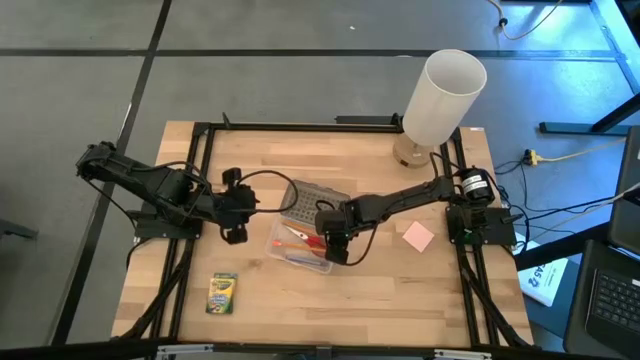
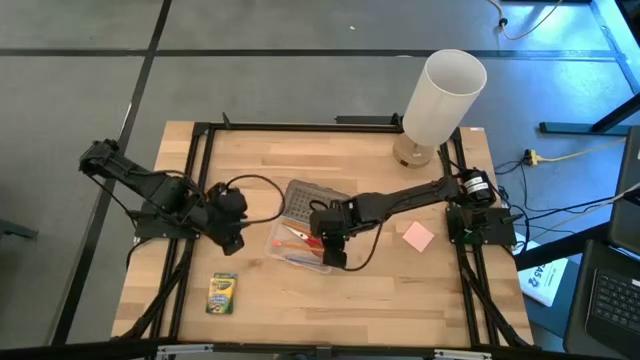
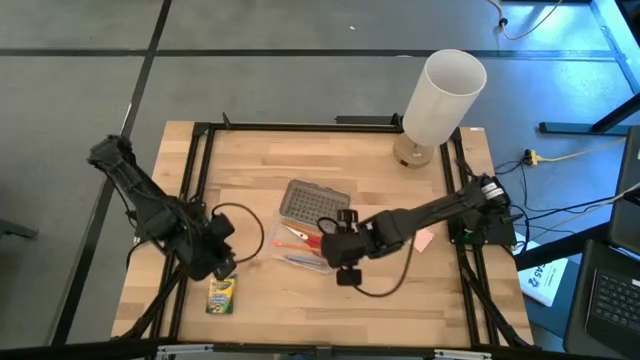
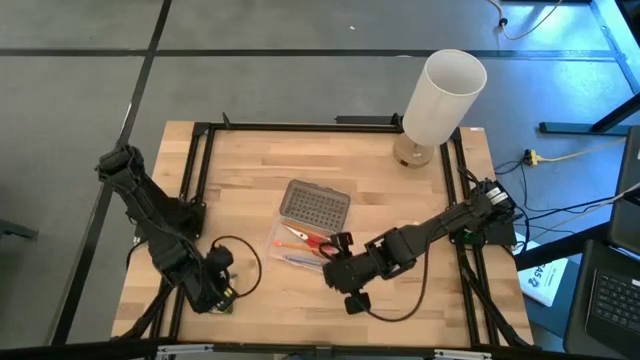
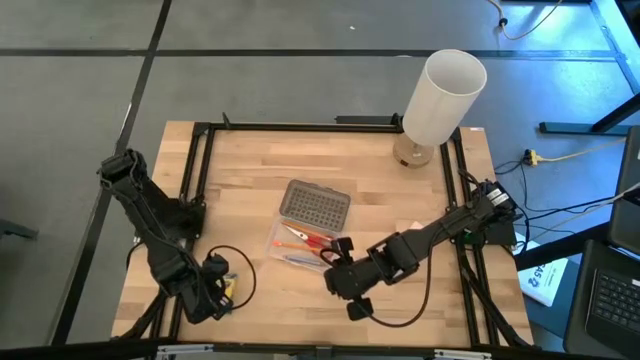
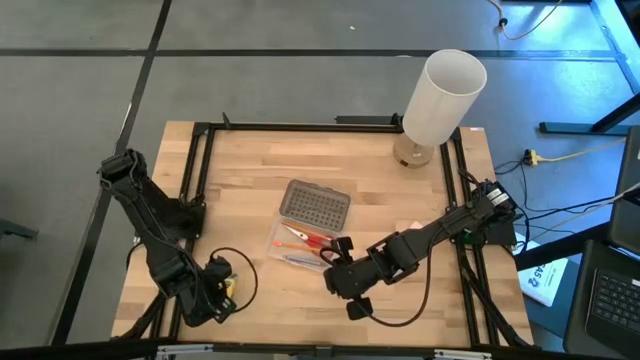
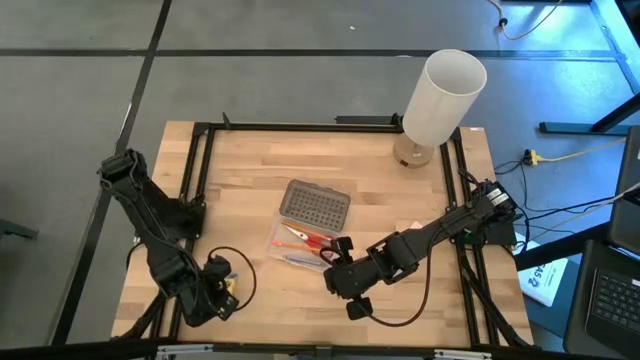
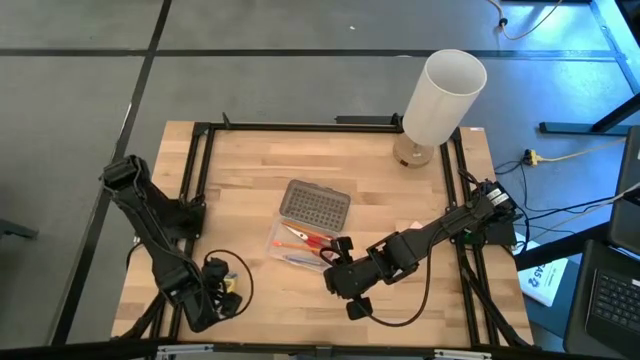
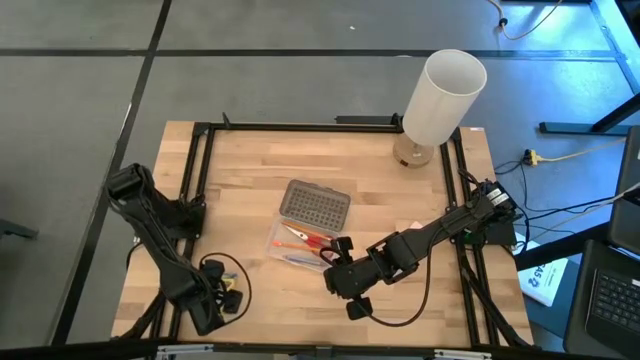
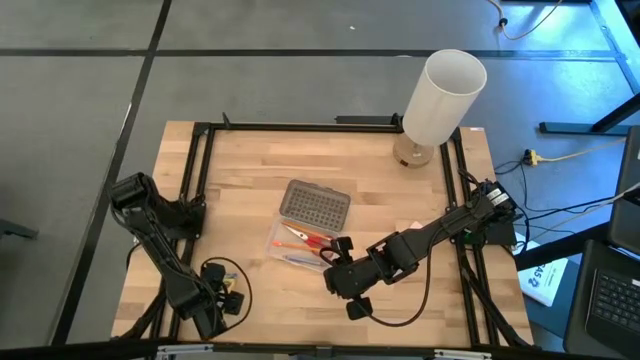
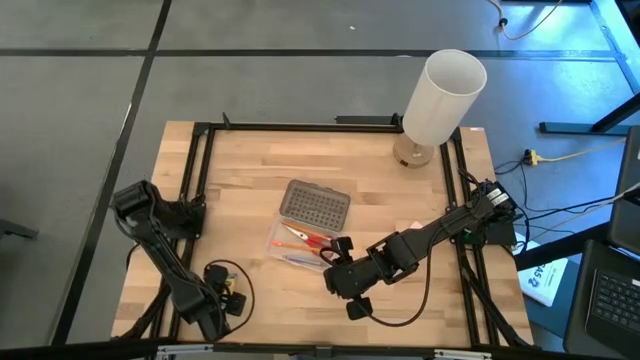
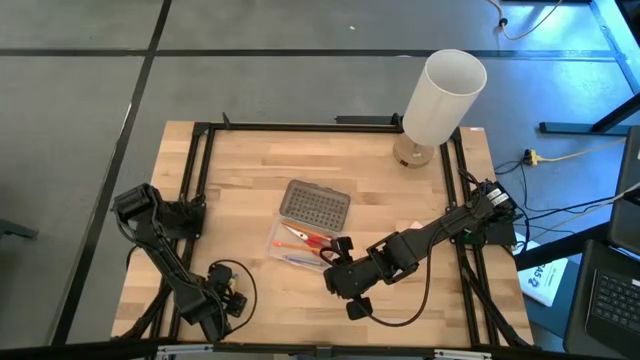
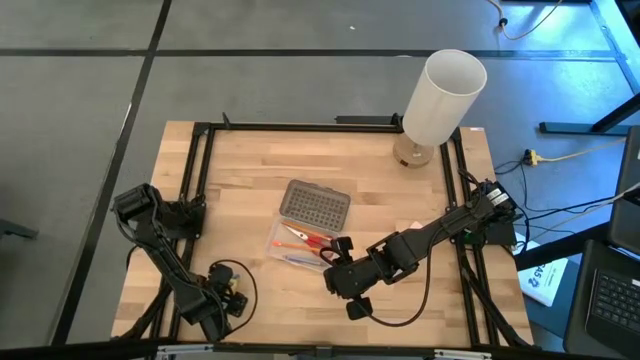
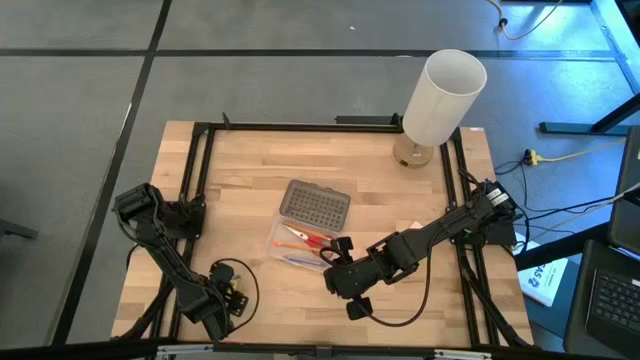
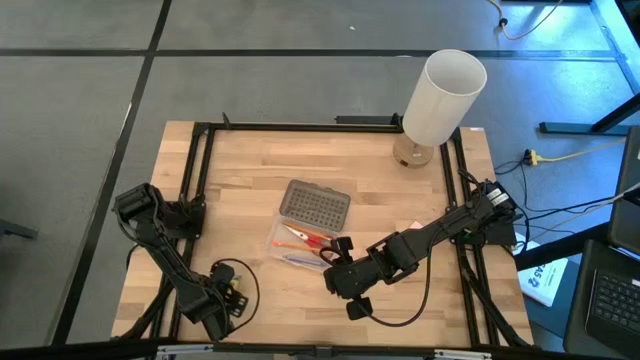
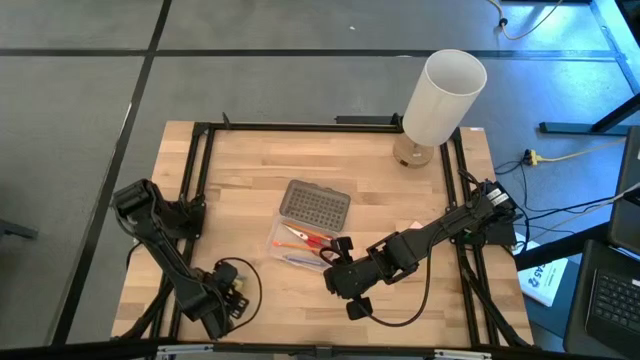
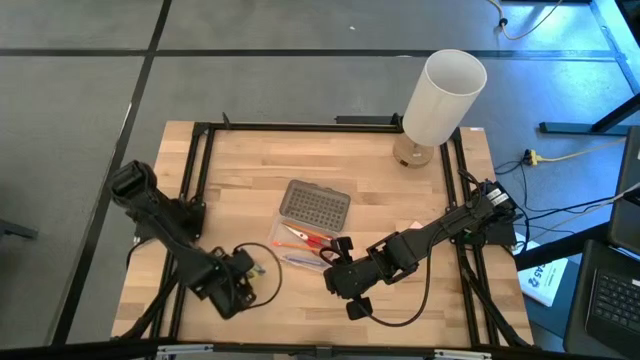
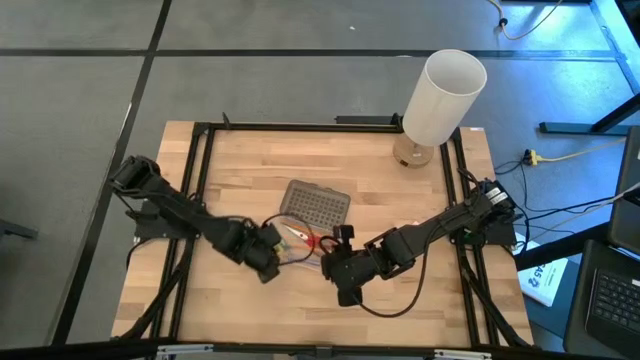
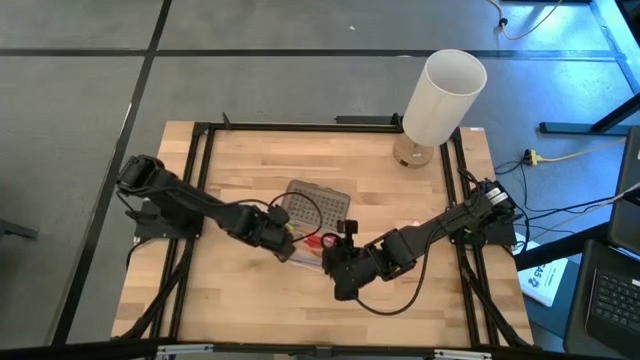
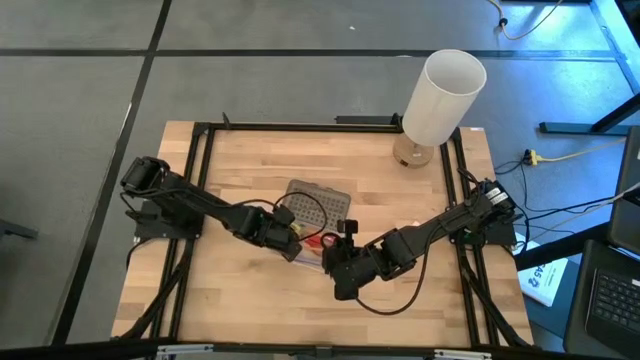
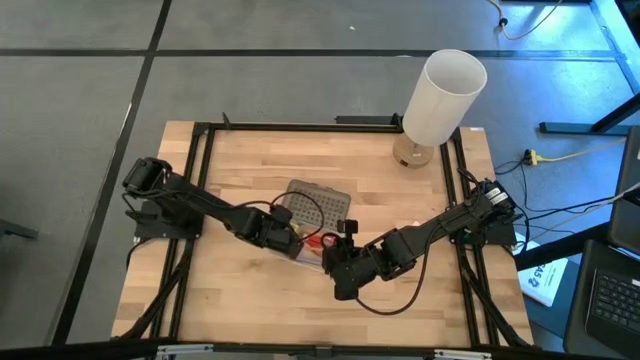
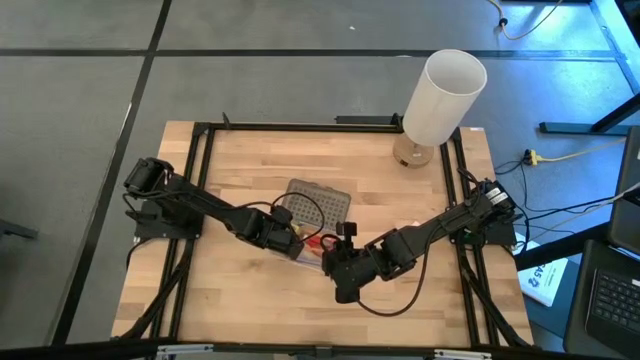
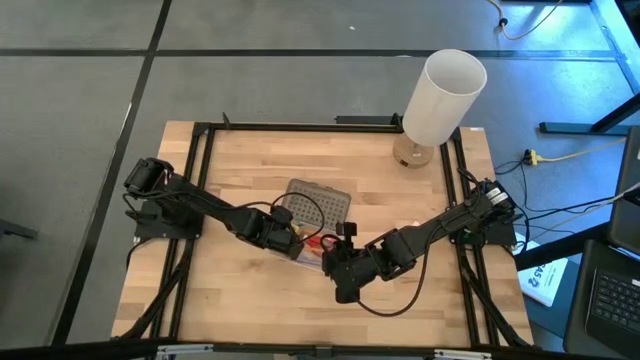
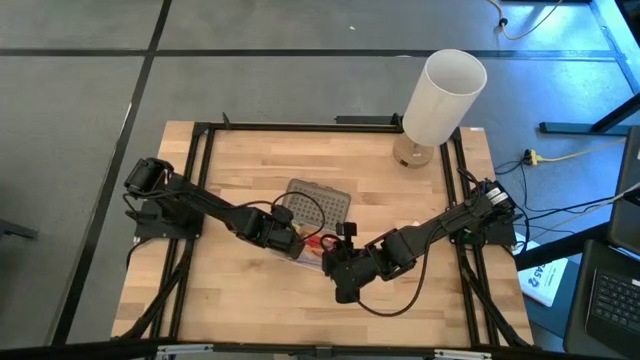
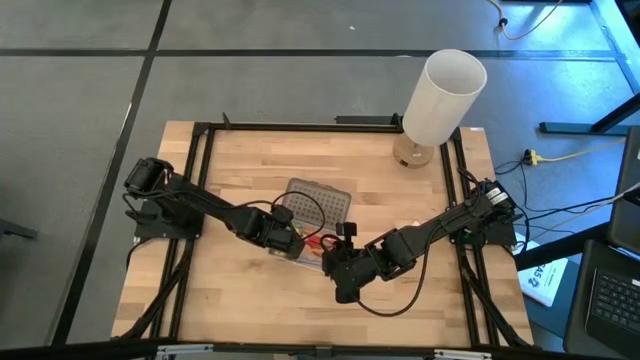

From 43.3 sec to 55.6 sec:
Task: Pack school essentials
Put the yellow crayon box into the black supply box

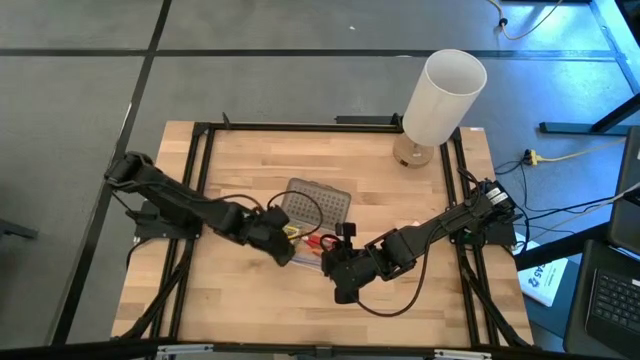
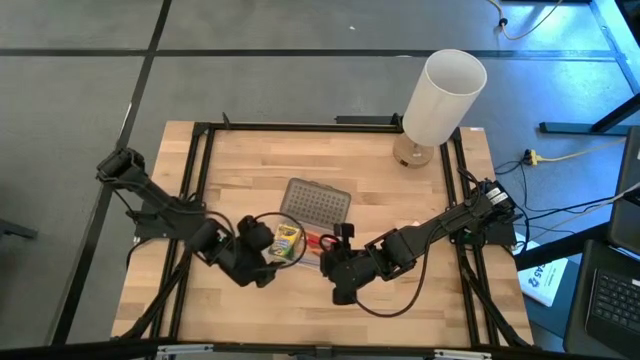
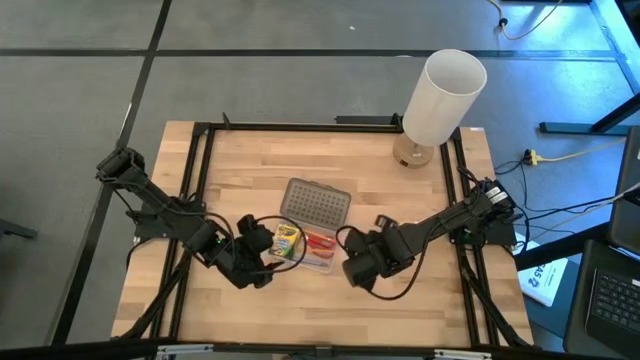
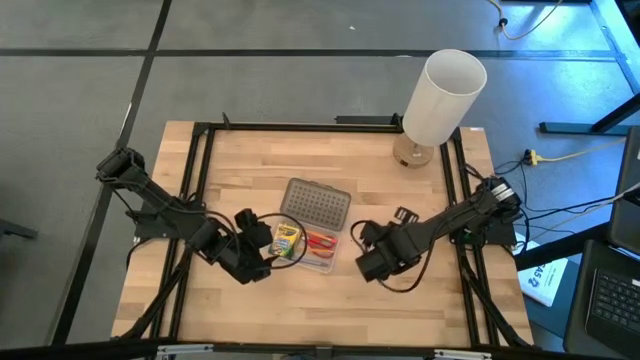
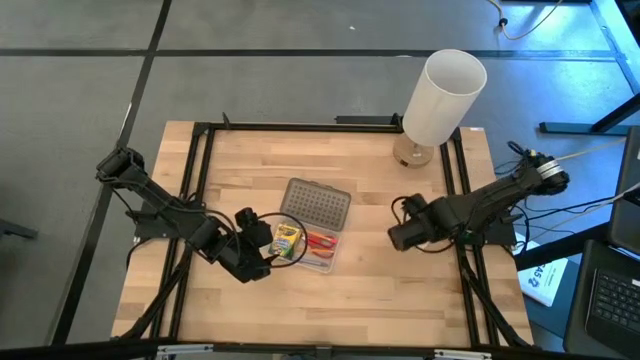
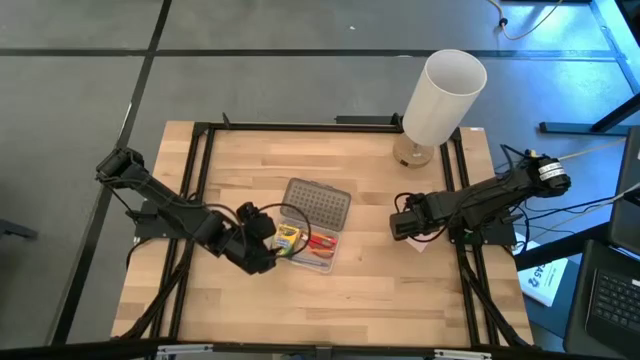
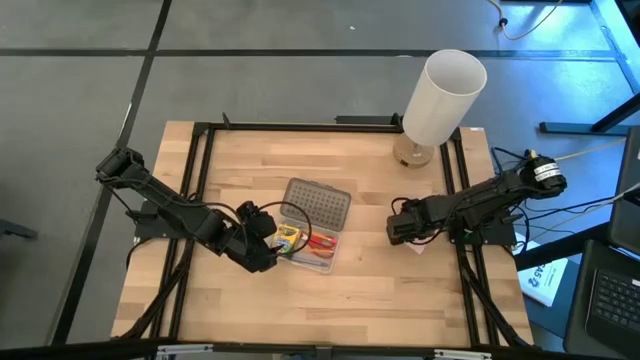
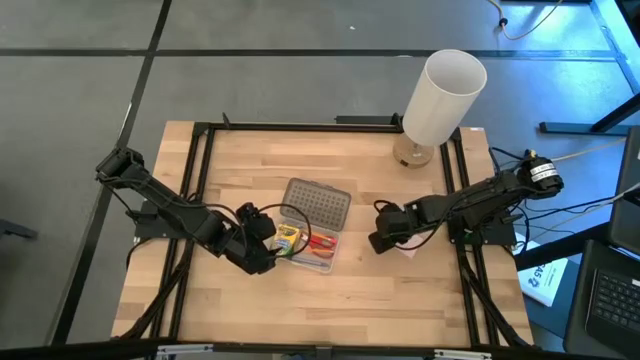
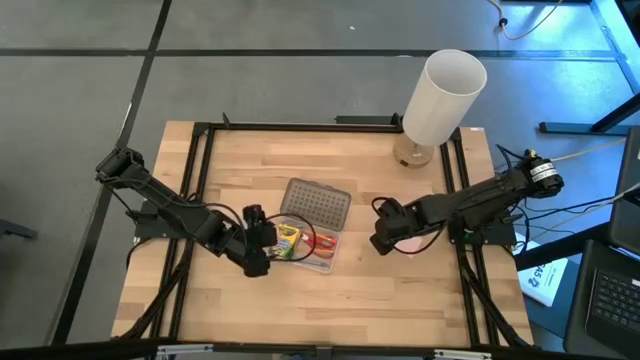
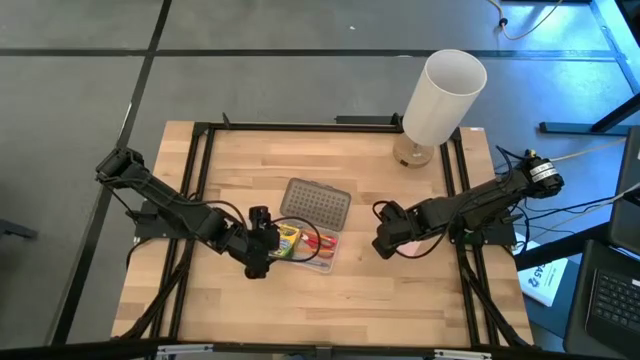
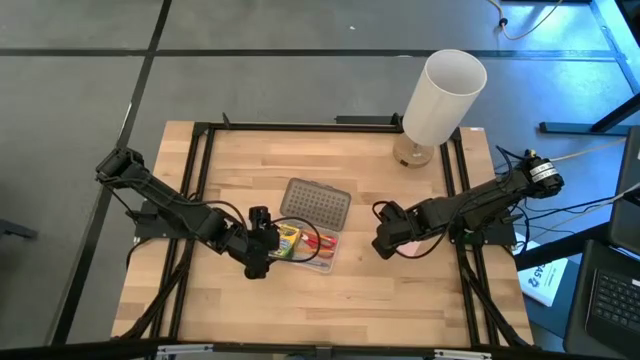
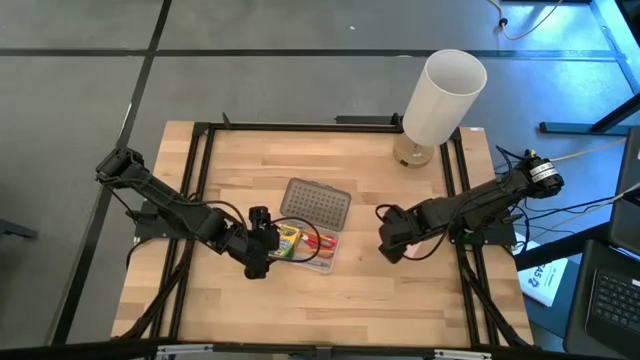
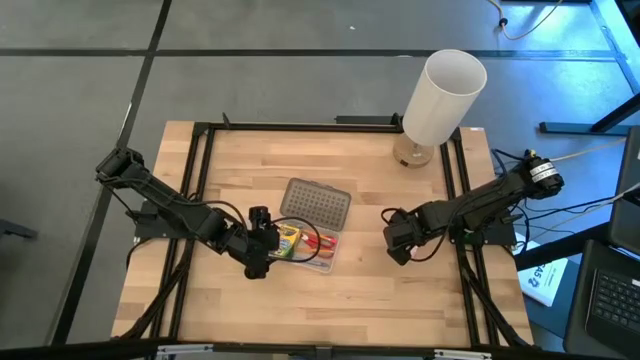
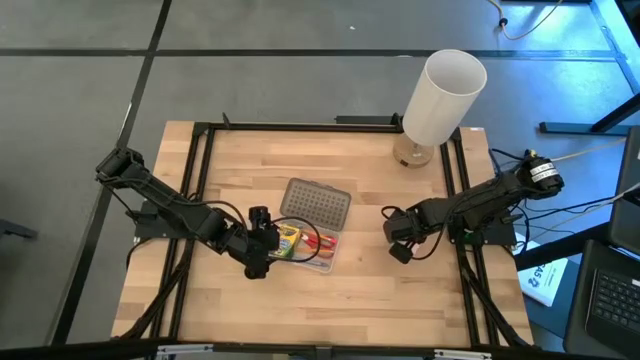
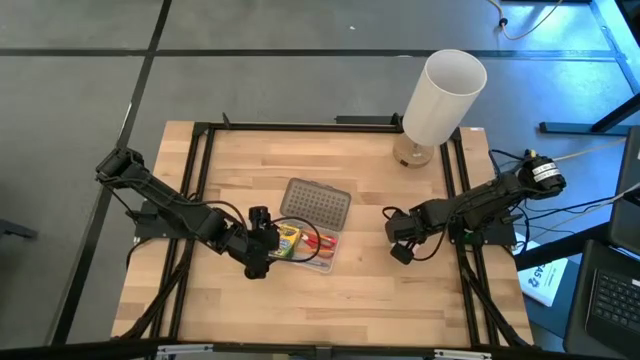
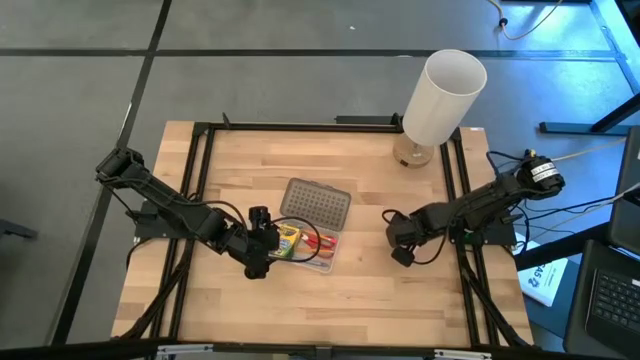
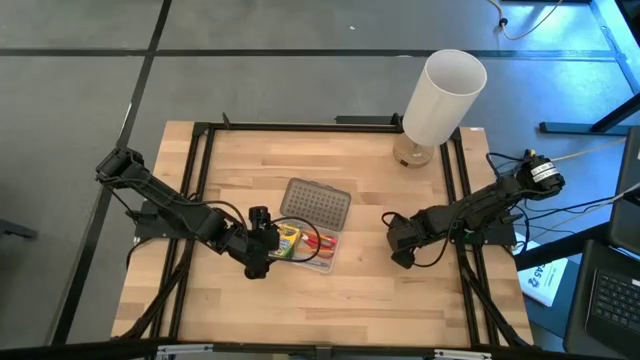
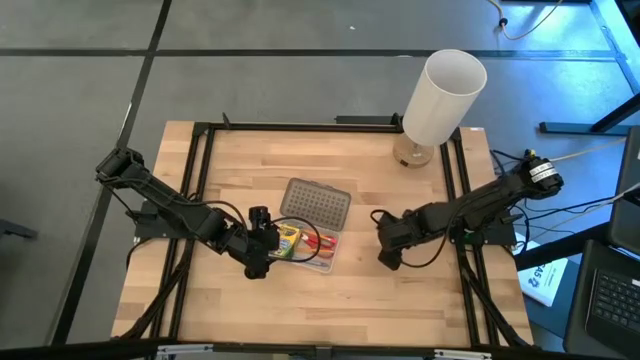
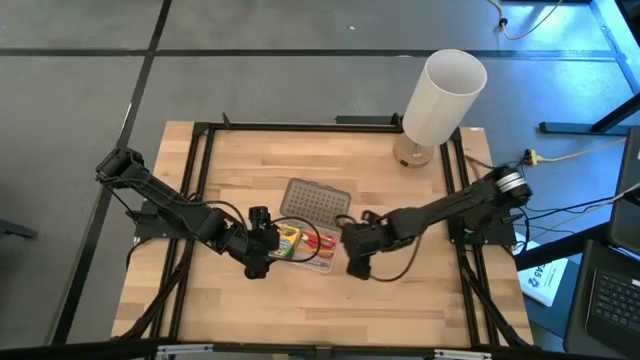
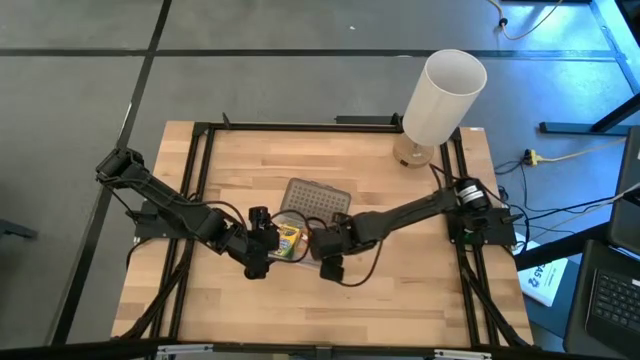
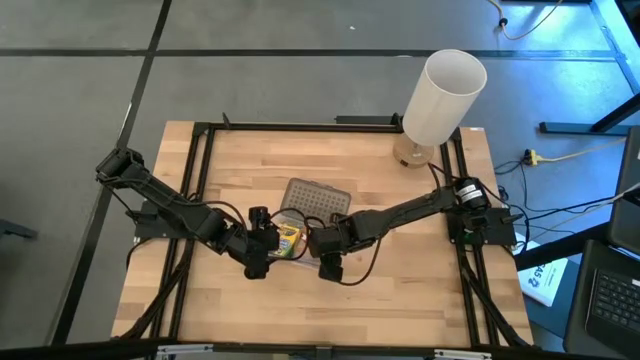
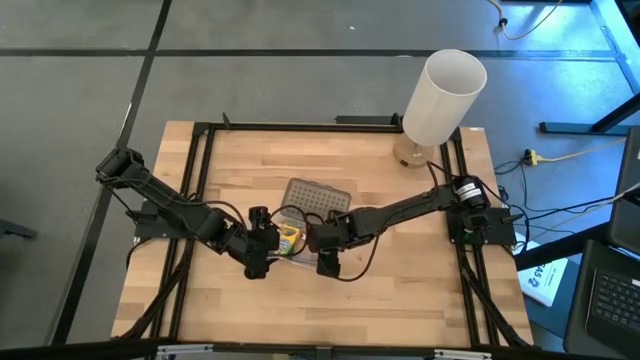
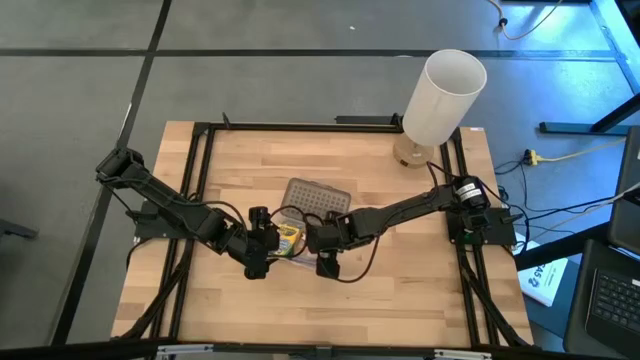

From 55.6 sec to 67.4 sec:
Put the sticky notes into the black supply box
